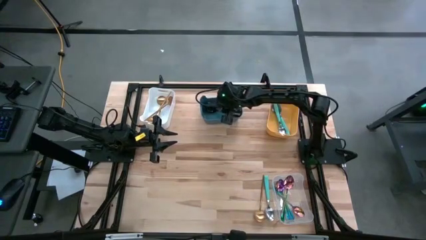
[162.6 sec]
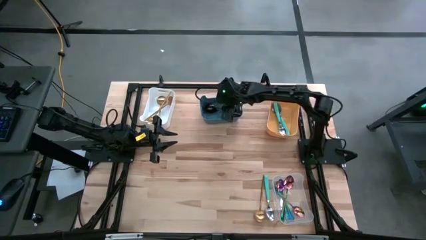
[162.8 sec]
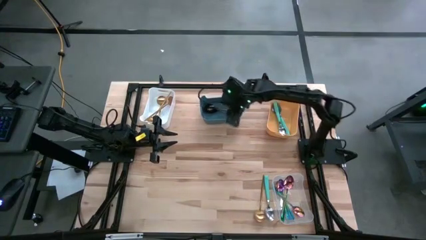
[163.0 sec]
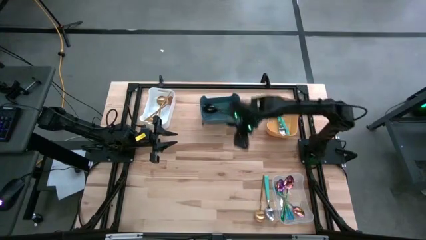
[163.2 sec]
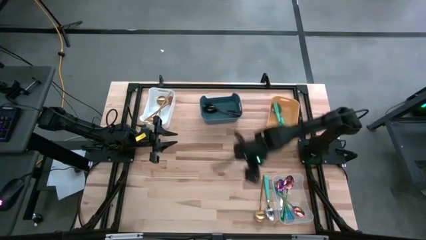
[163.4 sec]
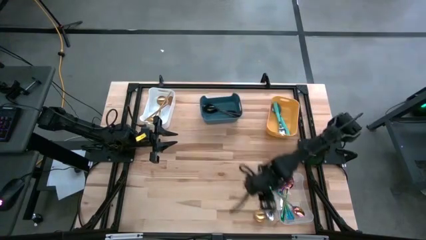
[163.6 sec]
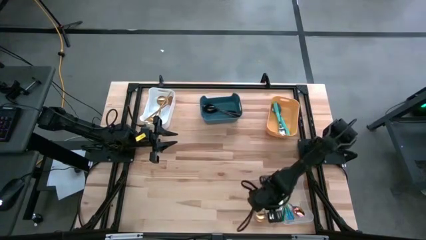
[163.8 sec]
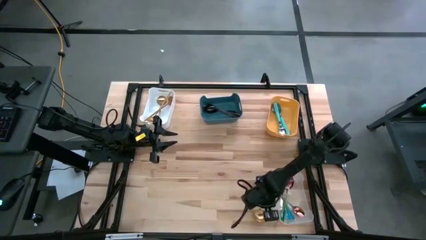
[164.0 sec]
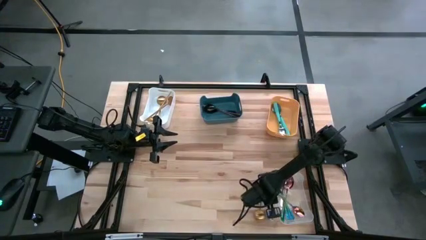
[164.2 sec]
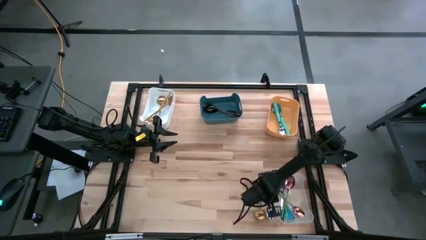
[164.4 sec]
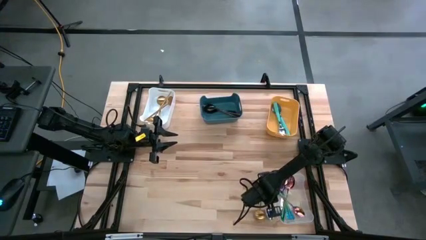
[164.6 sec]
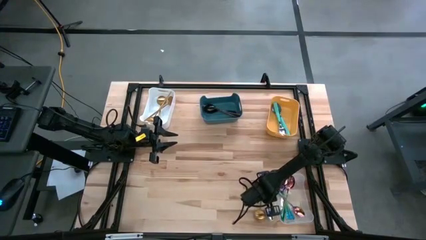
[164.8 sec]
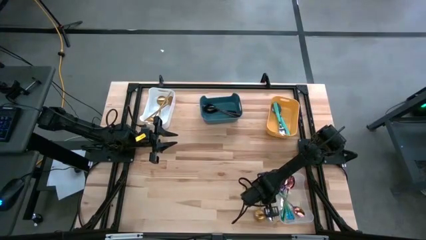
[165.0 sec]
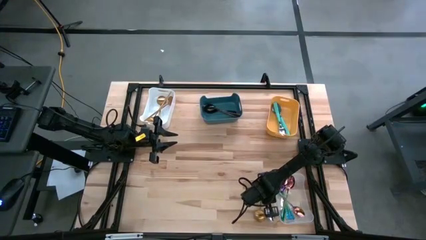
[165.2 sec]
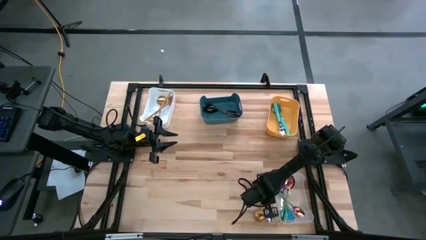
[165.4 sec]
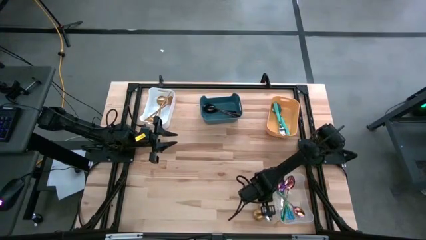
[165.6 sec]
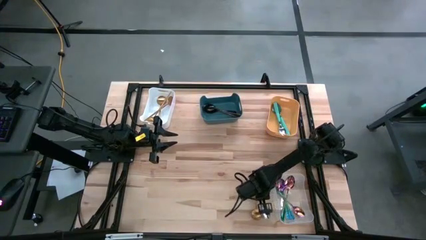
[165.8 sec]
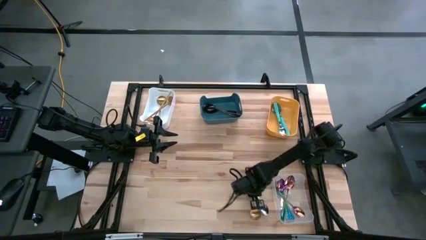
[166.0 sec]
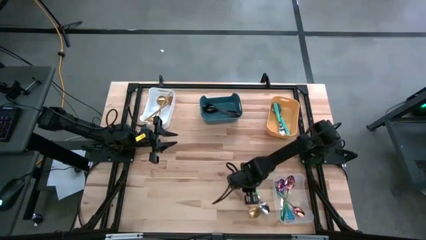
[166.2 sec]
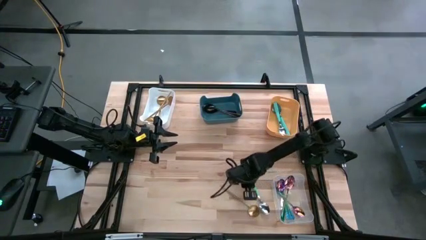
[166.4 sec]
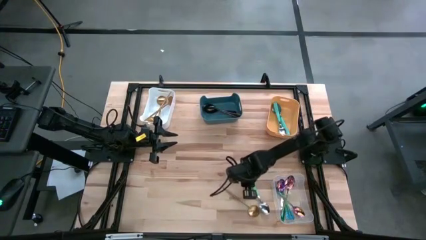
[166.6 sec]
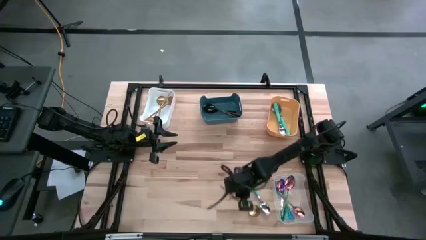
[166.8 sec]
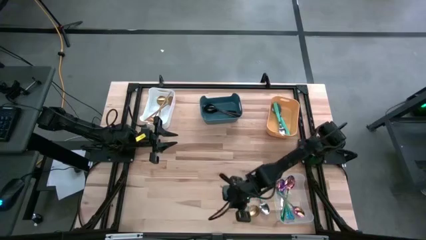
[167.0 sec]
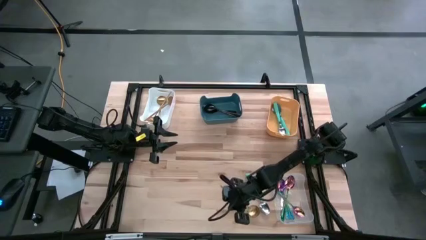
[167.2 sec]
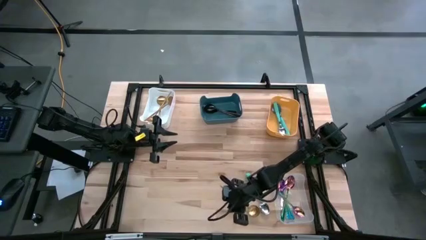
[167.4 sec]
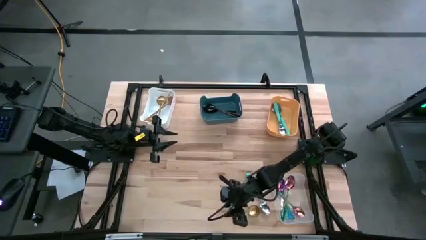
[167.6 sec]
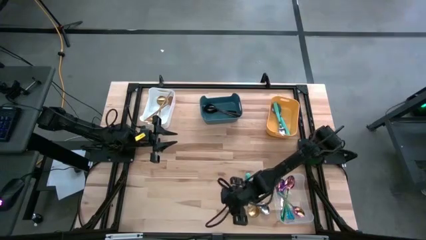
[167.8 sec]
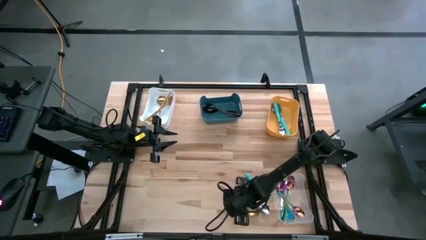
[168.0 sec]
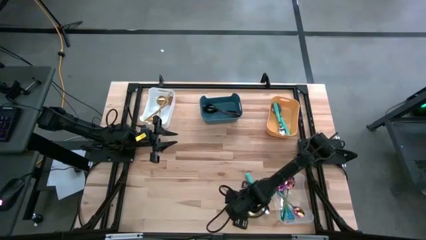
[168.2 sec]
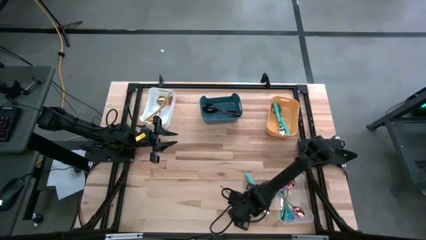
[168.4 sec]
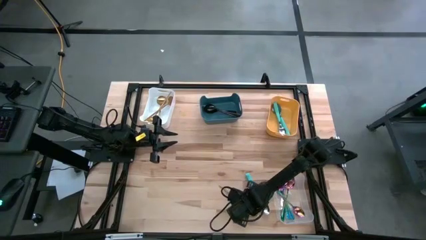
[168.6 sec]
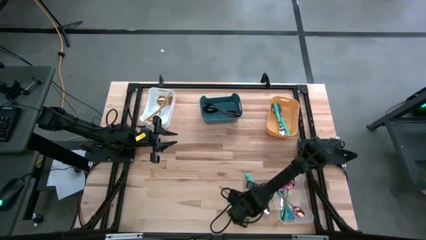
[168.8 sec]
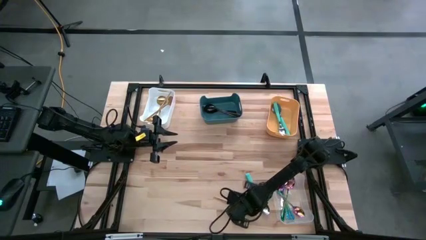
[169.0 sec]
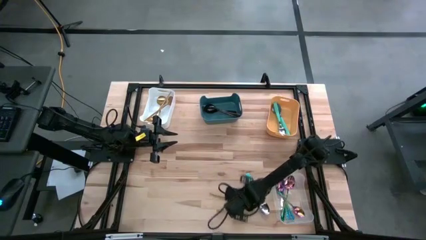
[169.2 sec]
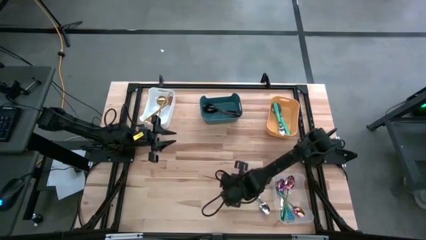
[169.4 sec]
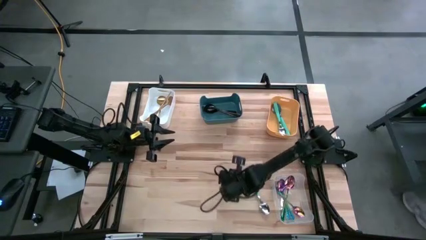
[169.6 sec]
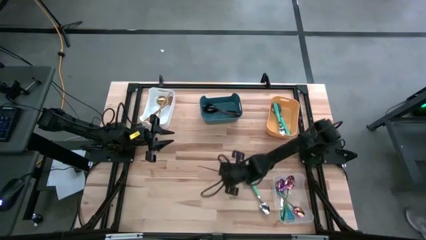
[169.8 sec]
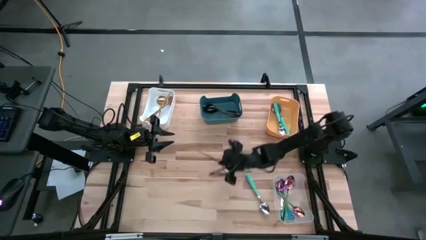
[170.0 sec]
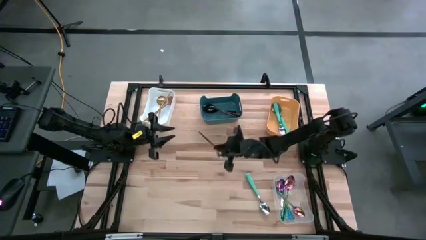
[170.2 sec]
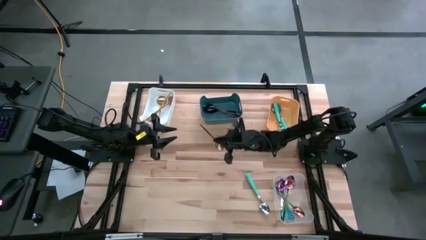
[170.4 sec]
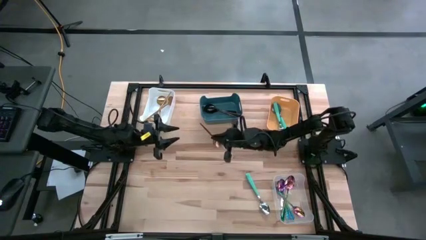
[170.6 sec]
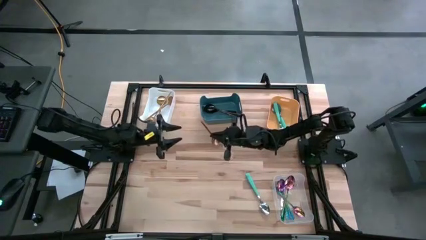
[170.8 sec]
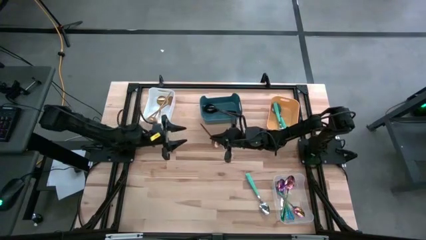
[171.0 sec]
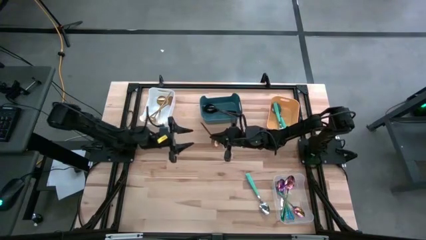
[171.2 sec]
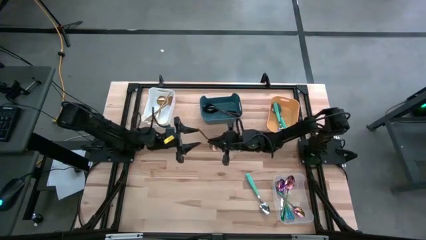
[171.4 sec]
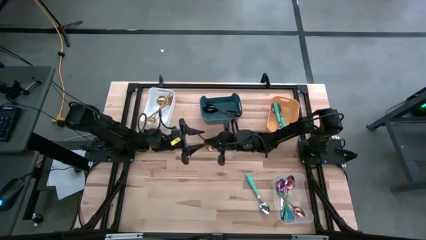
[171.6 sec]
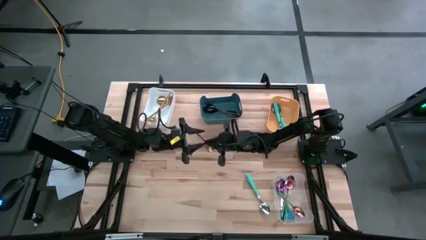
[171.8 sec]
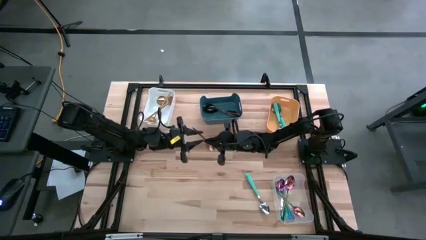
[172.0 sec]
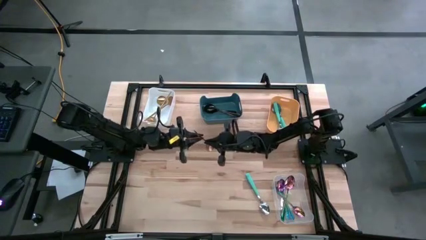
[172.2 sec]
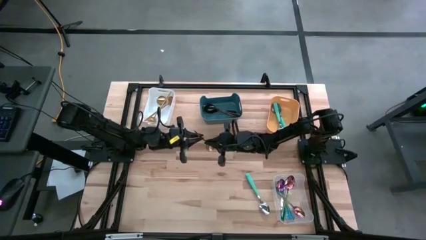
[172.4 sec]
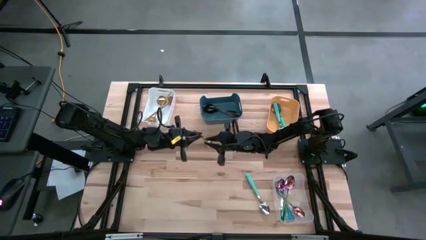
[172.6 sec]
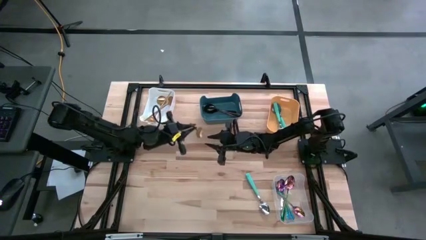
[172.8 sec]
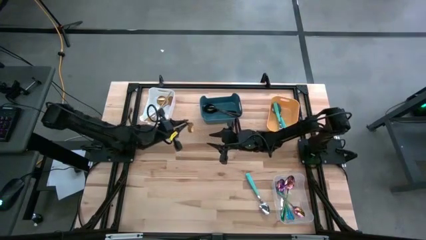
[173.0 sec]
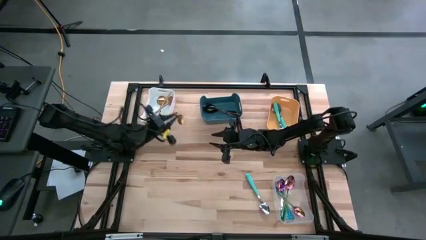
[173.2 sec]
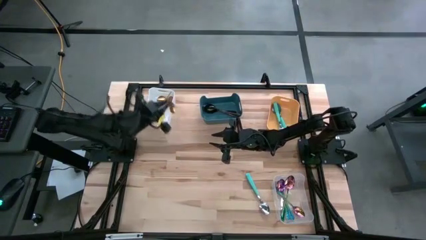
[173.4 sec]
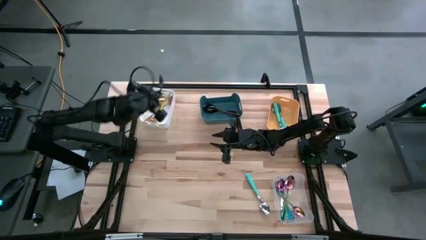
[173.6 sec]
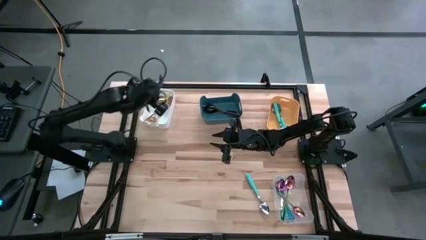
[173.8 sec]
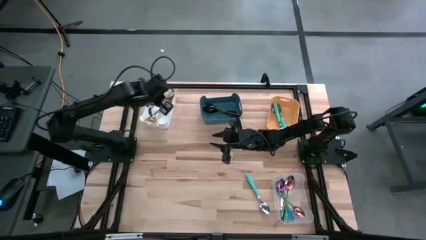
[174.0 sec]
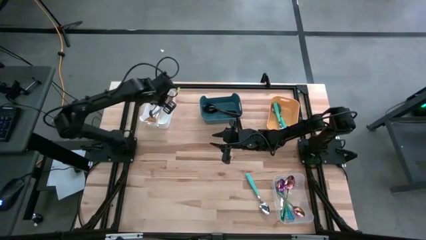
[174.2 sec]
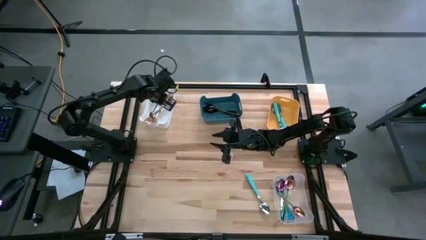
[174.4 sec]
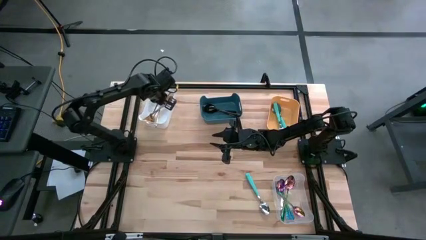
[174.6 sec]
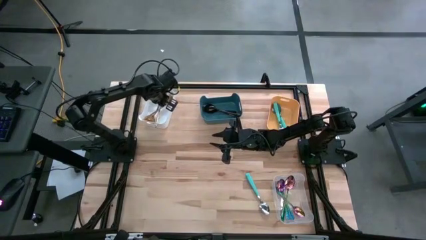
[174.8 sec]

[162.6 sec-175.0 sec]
Task: Sort silverware by color (type)
Put the gold spoon into the white bin
